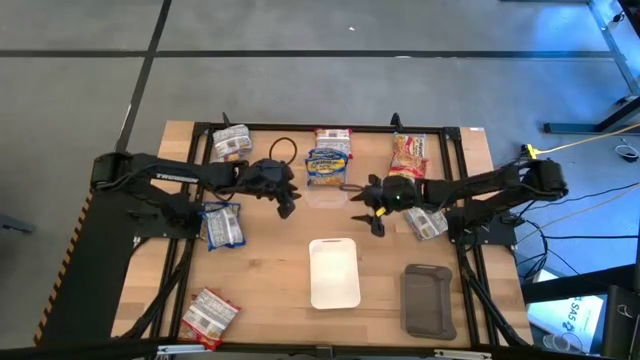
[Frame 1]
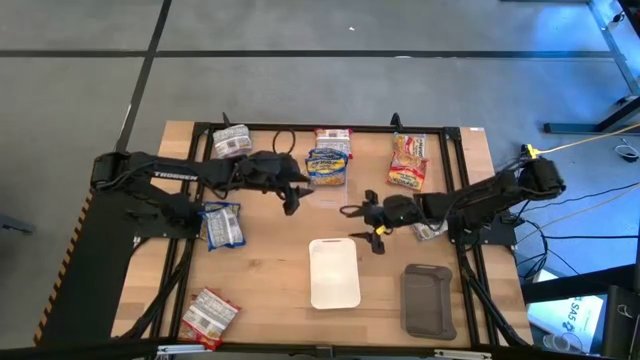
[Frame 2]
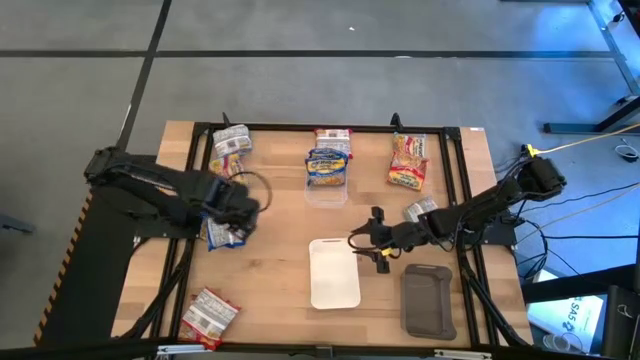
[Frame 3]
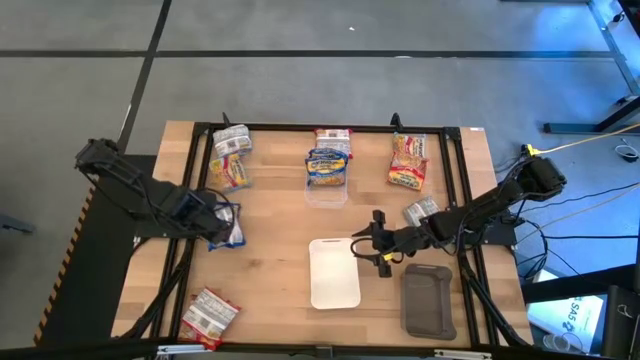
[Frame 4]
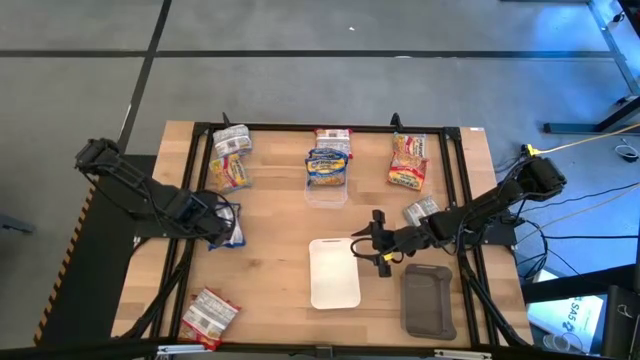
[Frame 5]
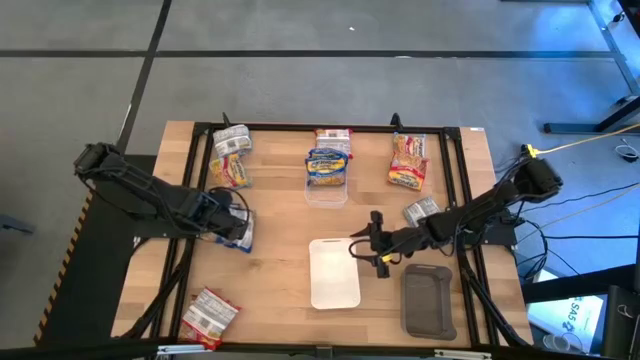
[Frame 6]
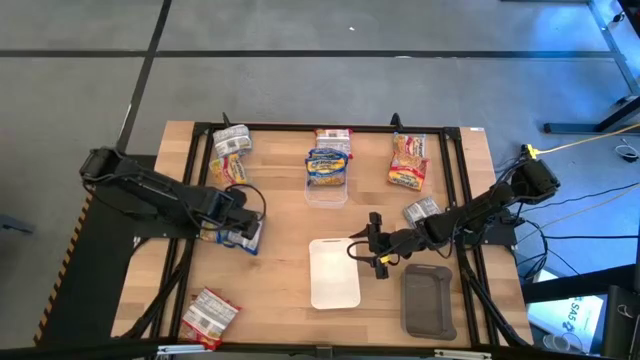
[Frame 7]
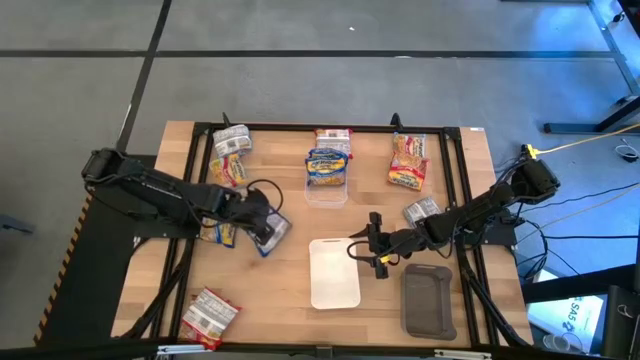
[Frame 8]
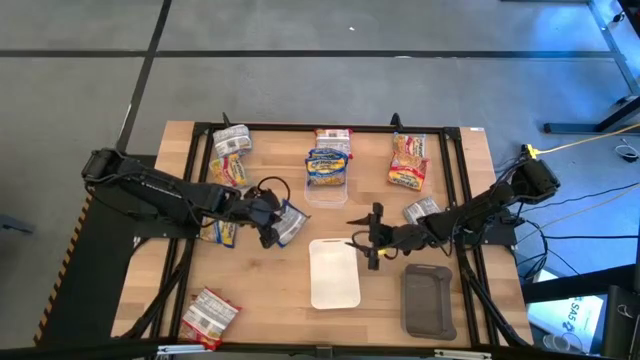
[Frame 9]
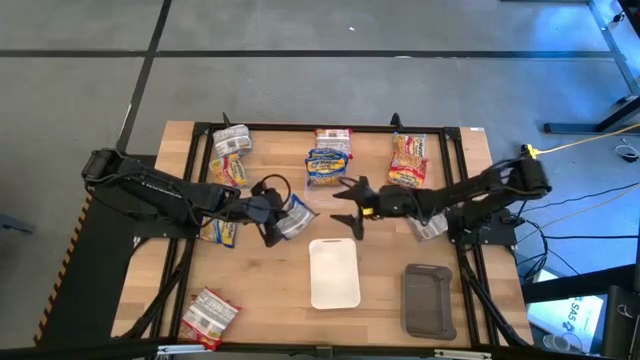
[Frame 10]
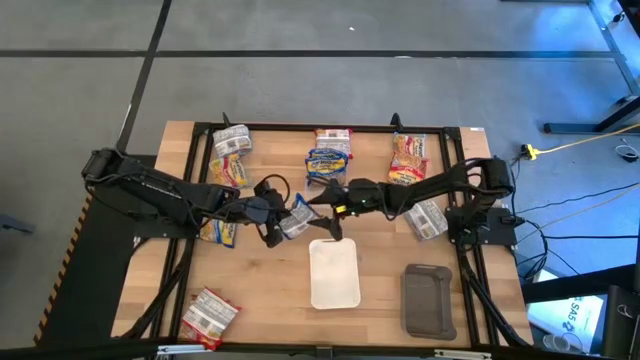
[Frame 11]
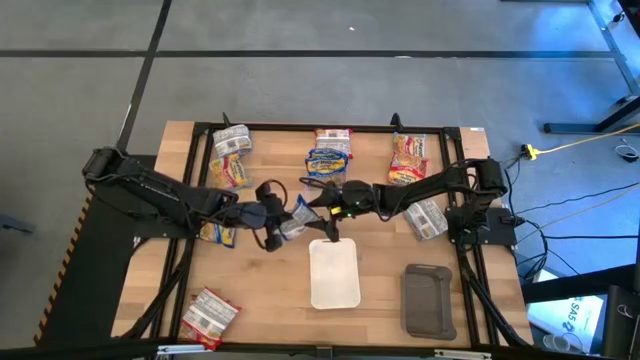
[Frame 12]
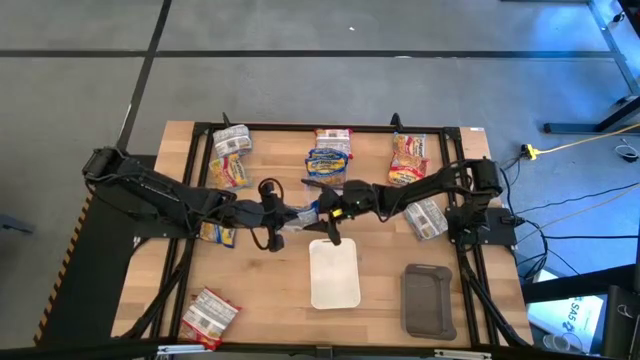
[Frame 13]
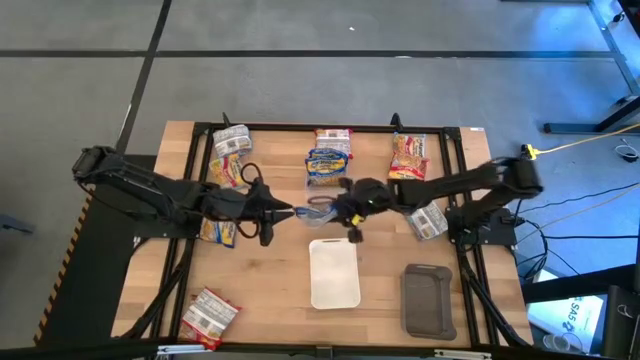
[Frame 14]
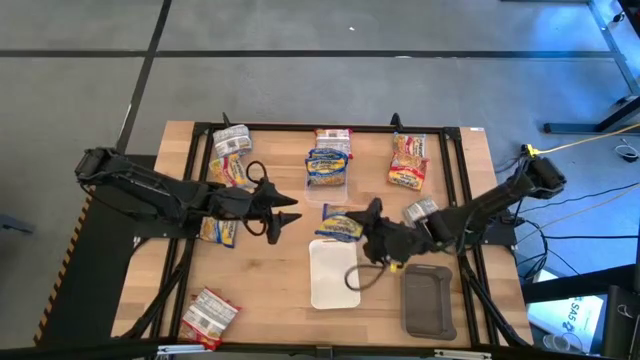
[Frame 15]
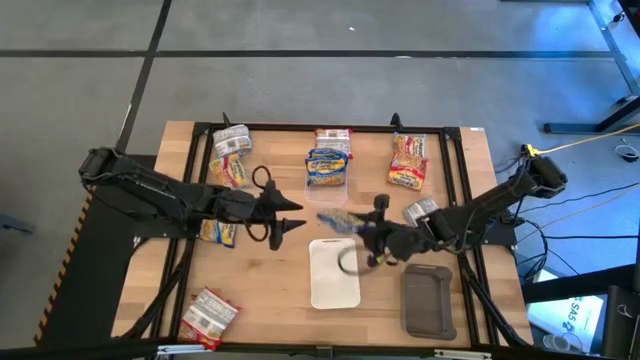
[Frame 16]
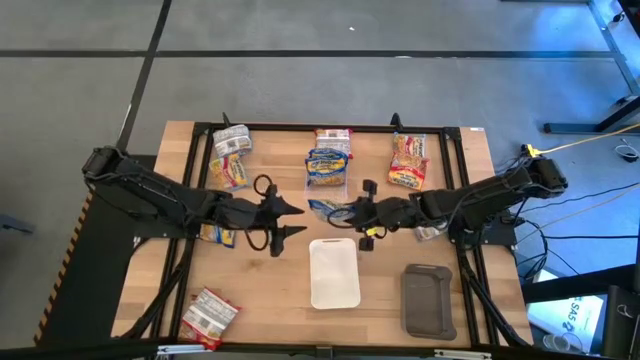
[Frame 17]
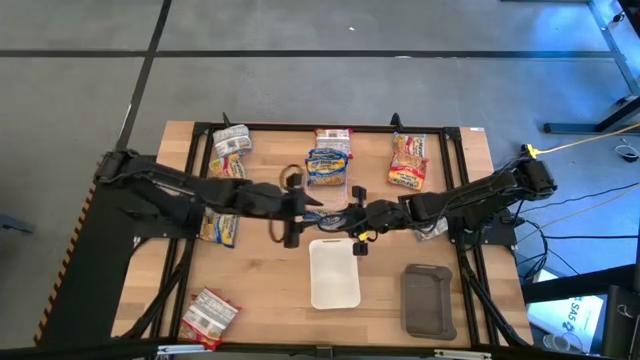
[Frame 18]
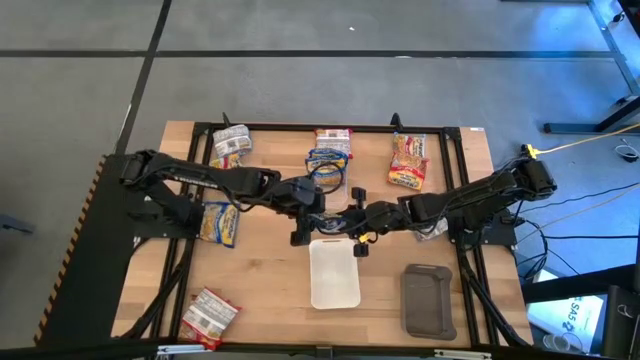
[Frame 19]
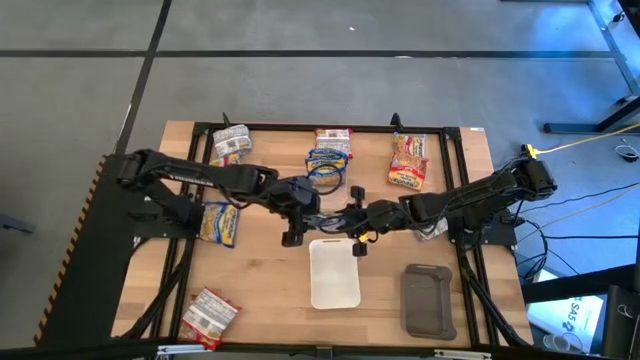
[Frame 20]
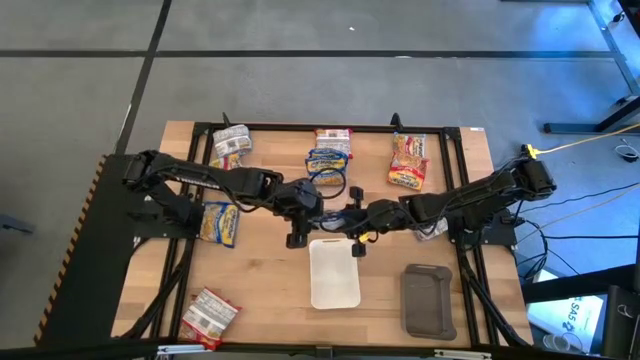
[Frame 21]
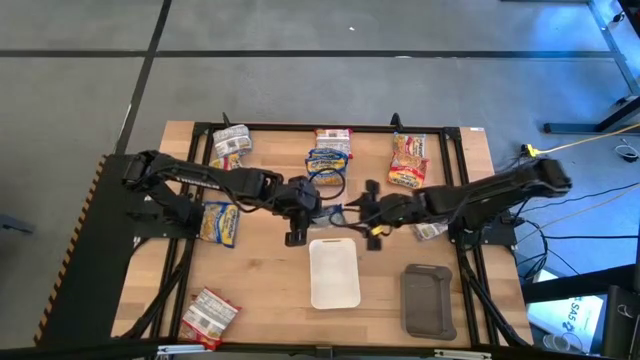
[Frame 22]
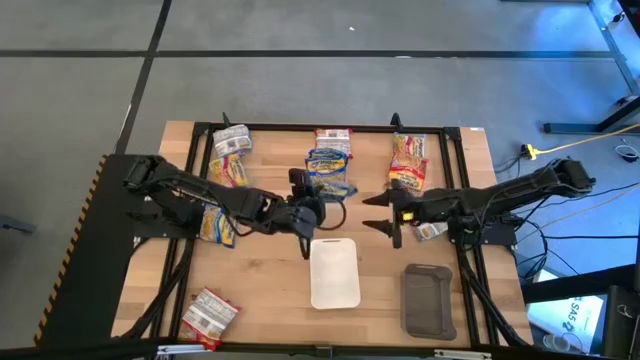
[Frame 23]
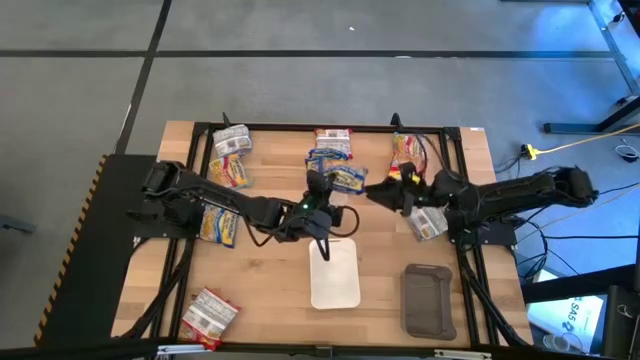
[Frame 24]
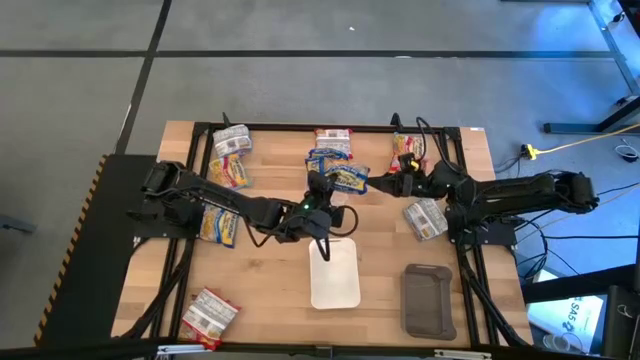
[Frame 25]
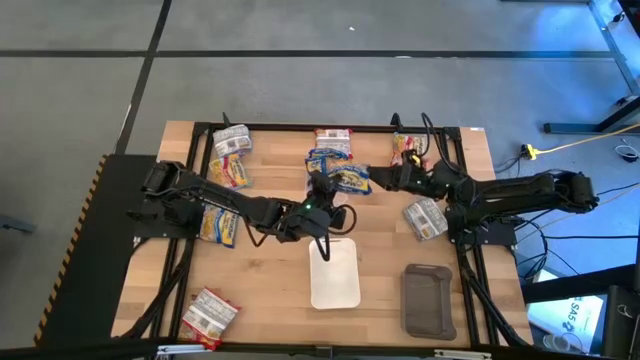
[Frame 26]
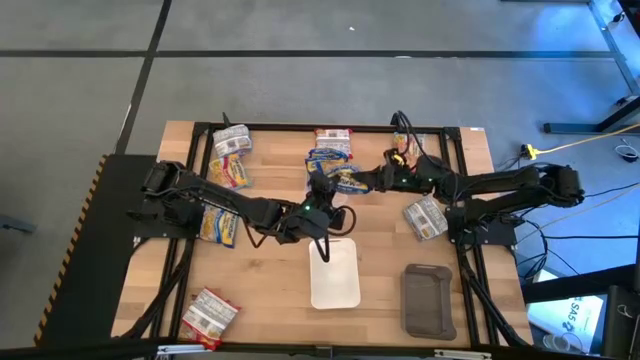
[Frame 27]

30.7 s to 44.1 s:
Task: Sort Maruchan noodles
Put the blue noodle pack into the transparent bin

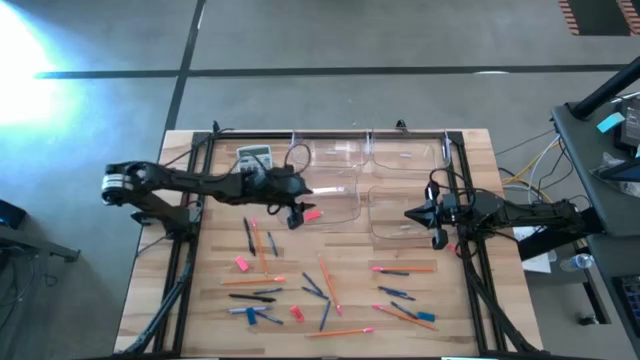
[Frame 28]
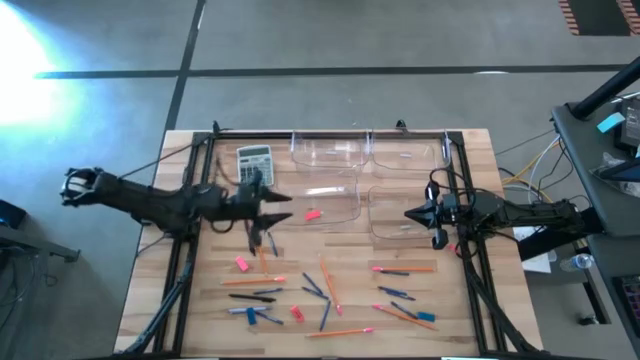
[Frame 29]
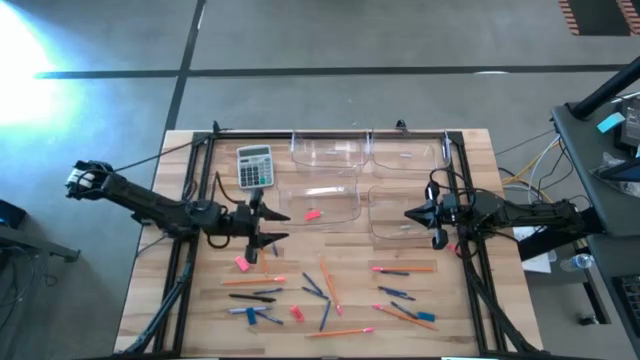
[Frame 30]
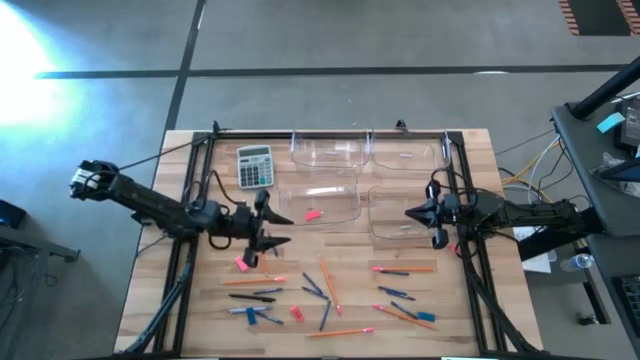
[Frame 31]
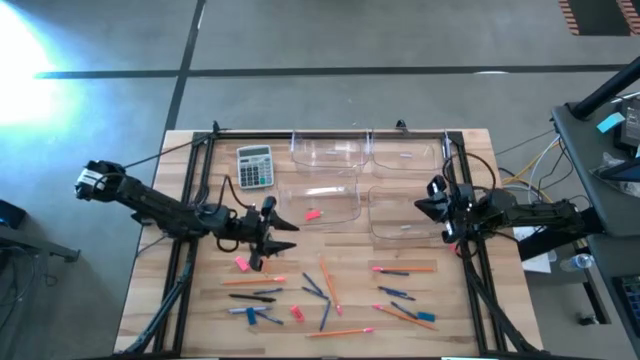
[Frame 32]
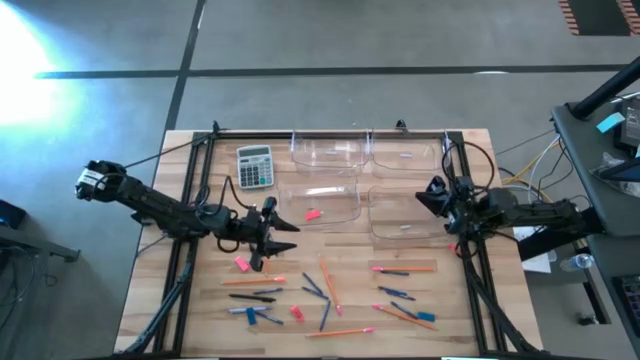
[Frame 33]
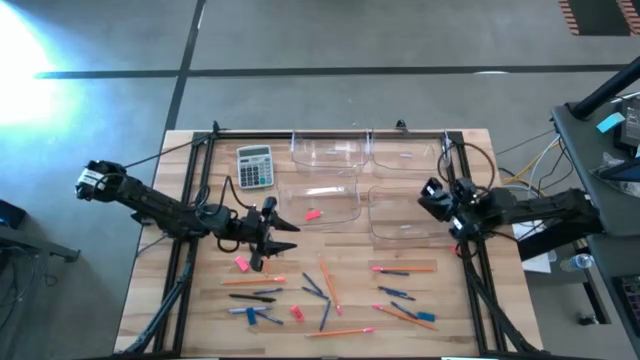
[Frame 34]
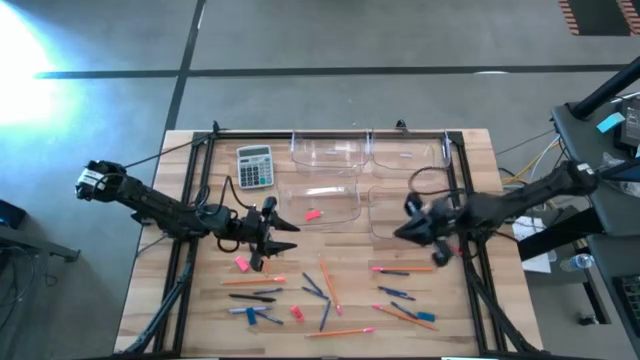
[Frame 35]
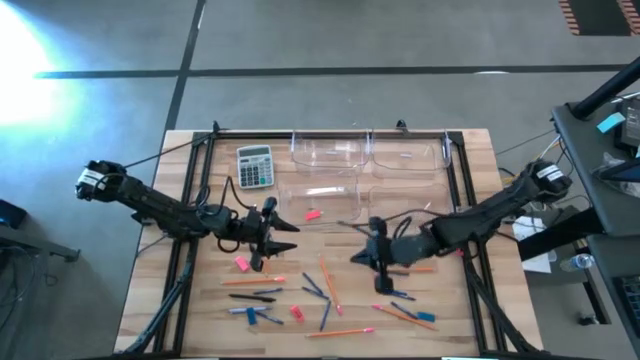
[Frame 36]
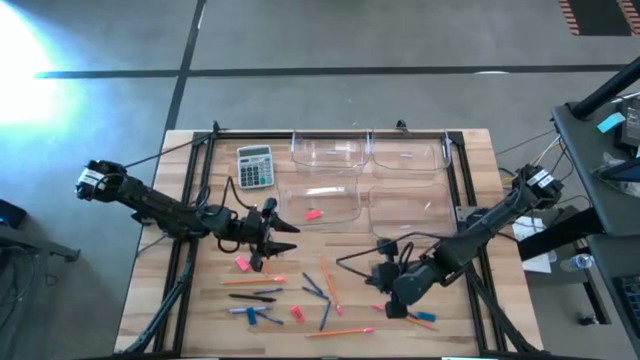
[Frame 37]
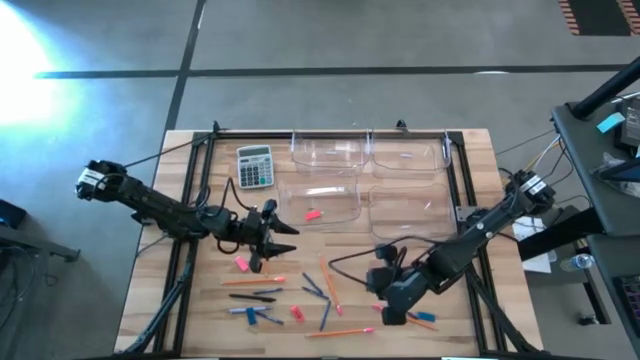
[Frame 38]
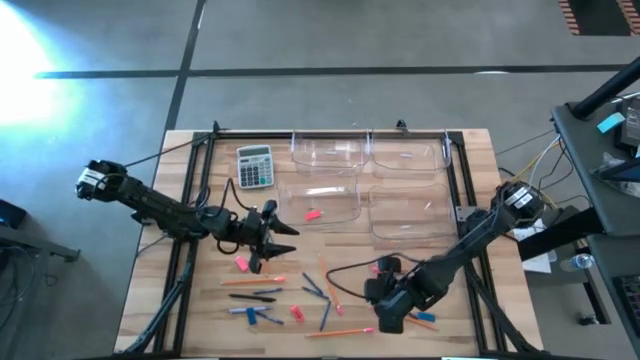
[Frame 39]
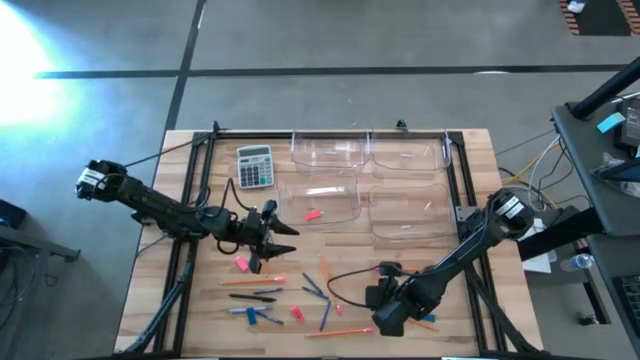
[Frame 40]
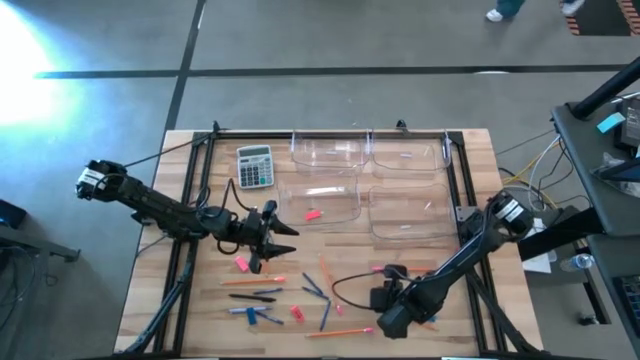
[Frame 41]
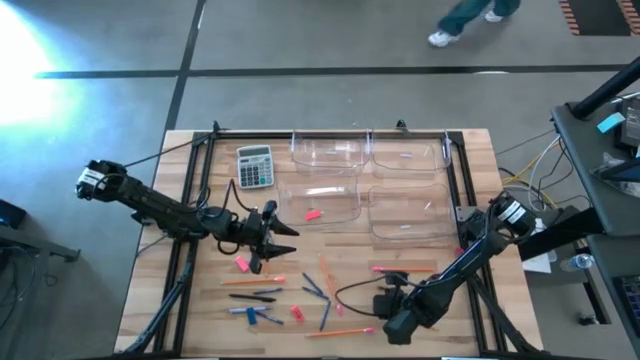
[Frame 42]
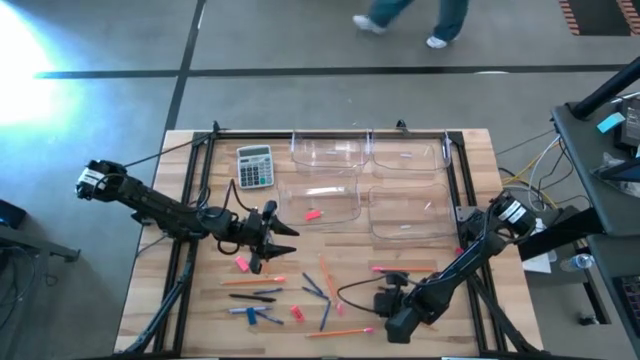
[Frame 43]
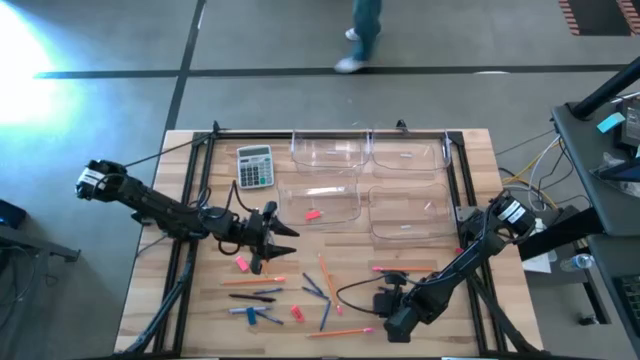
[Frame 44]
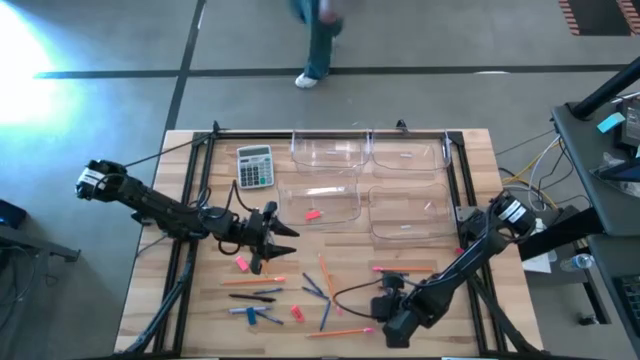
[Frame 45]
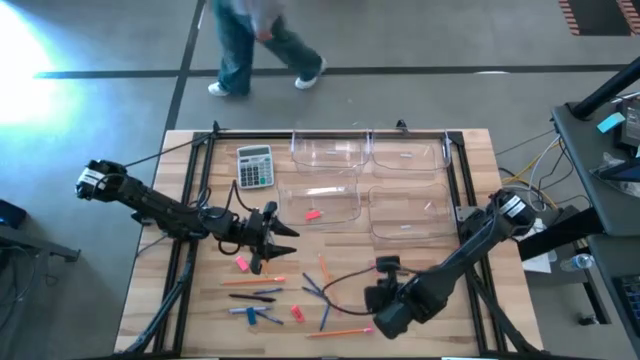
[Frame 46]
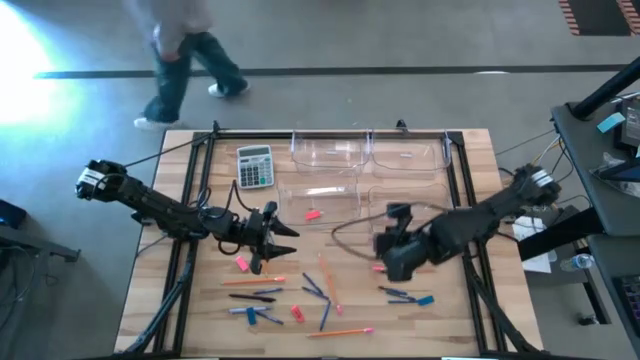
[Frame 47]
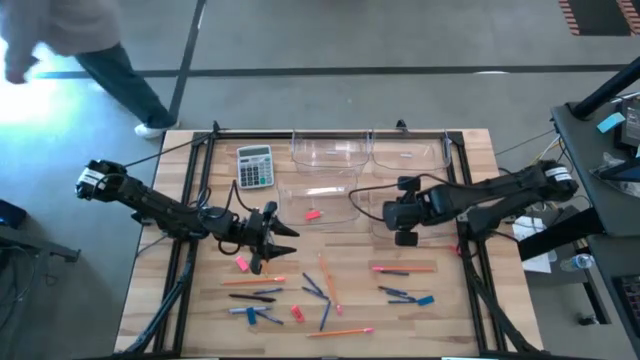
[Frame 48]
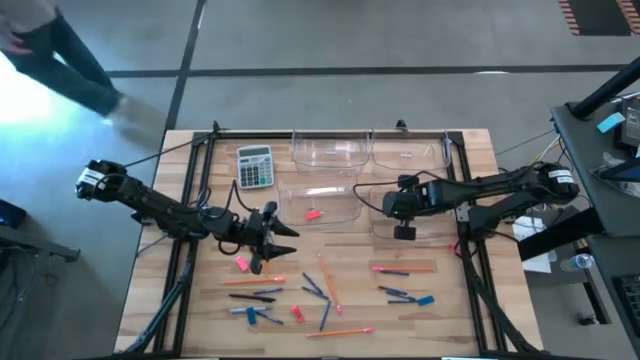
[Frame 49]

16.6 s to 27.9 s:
Task: Sort crayons/erasers/pens/pencils in bins
Put the orange pencil into the bottom right transparent bin
